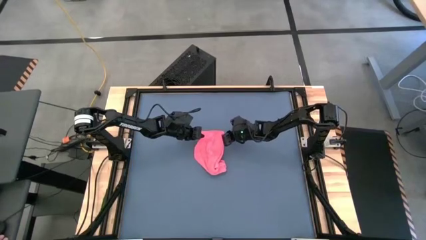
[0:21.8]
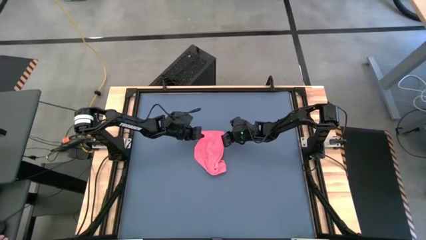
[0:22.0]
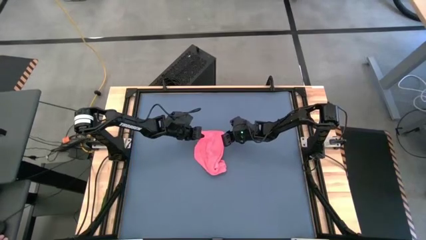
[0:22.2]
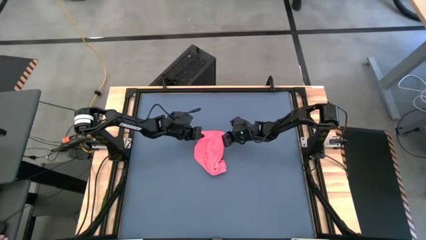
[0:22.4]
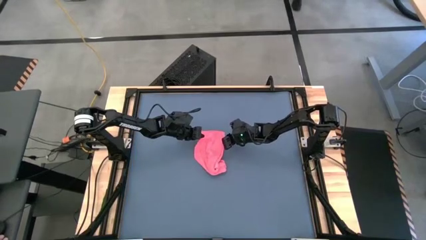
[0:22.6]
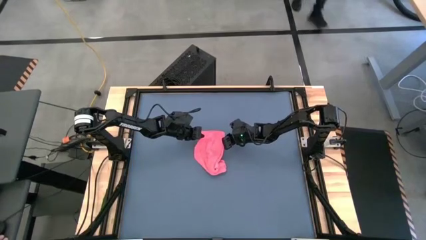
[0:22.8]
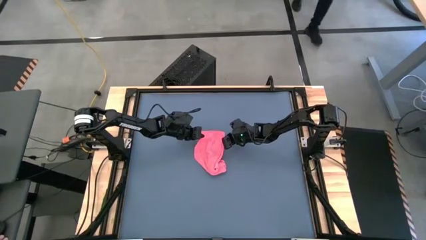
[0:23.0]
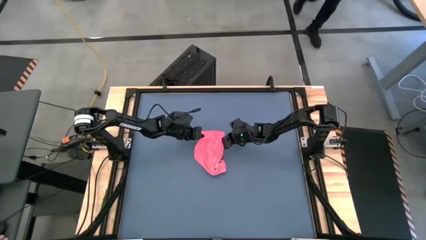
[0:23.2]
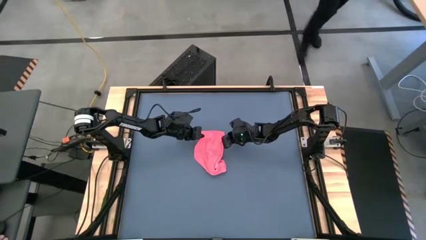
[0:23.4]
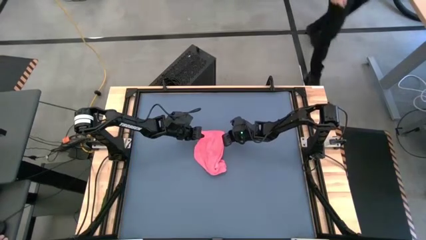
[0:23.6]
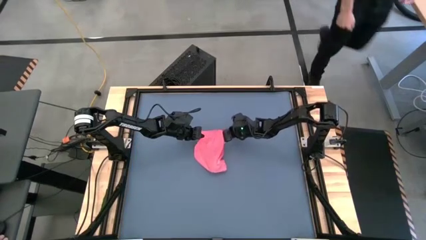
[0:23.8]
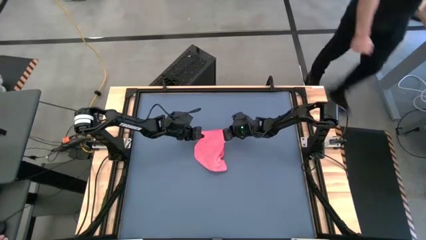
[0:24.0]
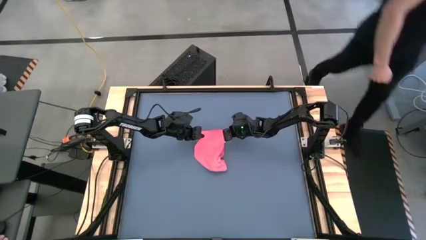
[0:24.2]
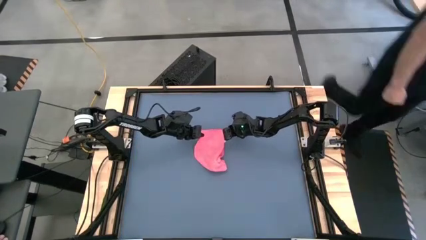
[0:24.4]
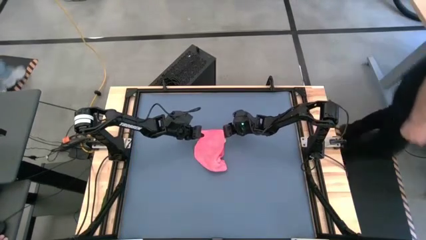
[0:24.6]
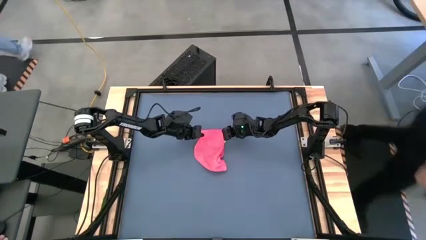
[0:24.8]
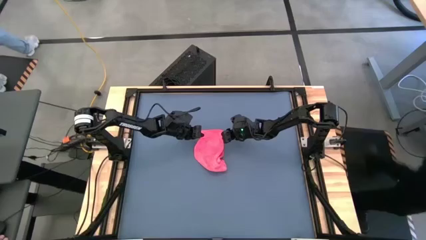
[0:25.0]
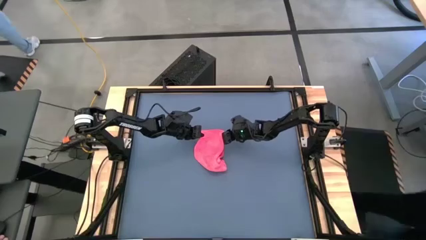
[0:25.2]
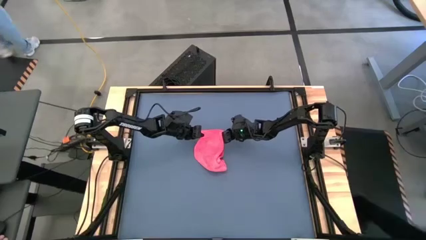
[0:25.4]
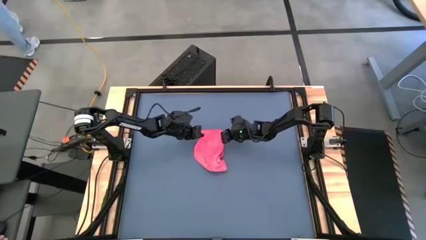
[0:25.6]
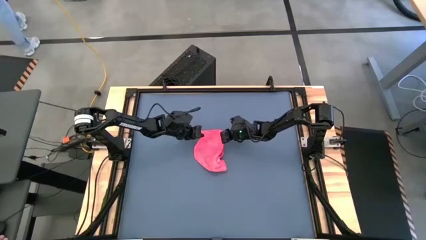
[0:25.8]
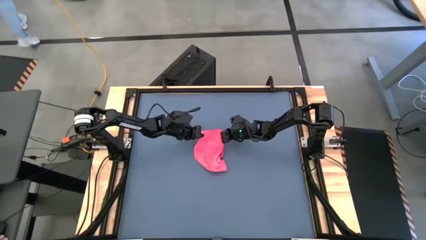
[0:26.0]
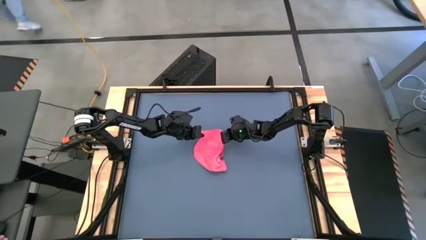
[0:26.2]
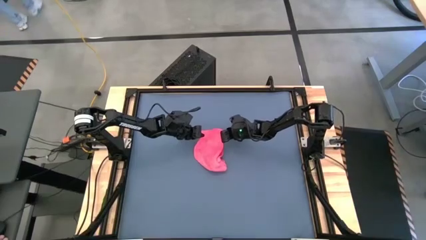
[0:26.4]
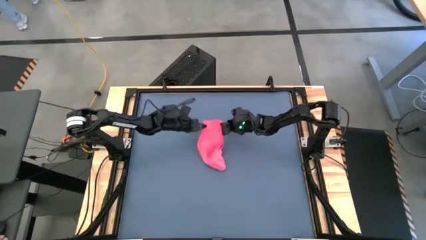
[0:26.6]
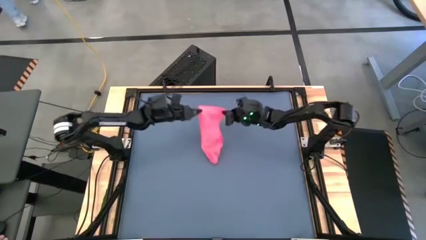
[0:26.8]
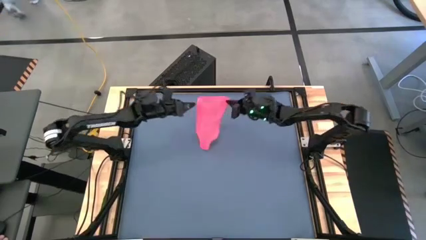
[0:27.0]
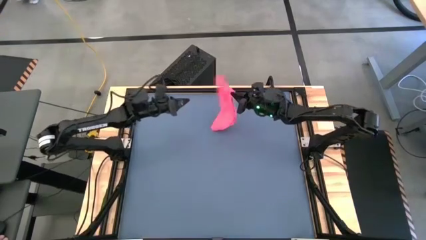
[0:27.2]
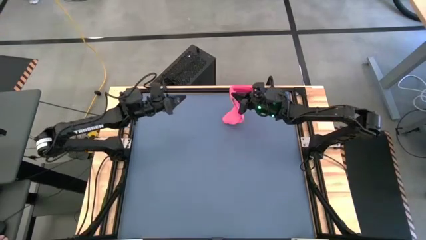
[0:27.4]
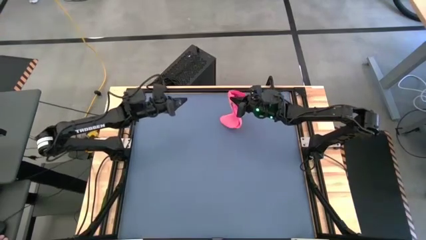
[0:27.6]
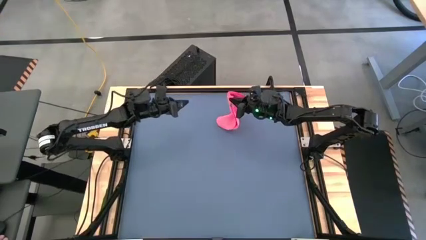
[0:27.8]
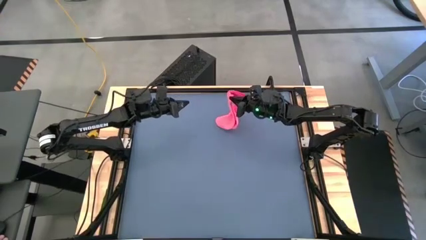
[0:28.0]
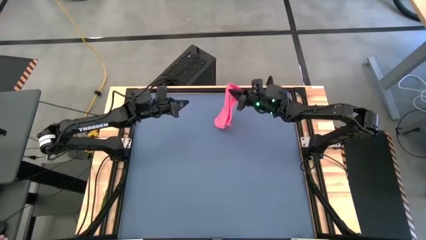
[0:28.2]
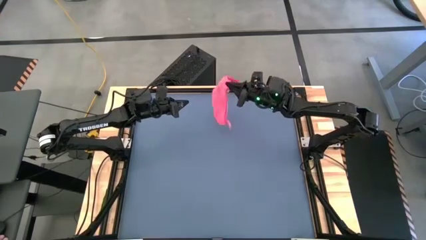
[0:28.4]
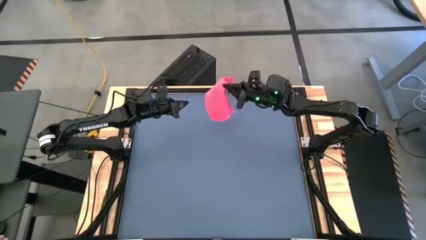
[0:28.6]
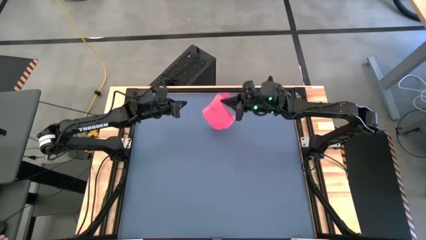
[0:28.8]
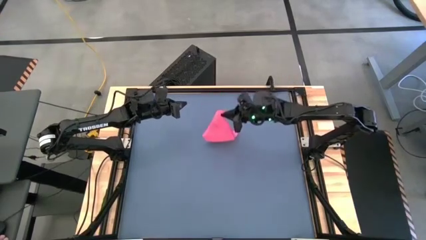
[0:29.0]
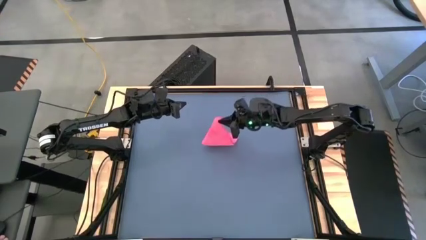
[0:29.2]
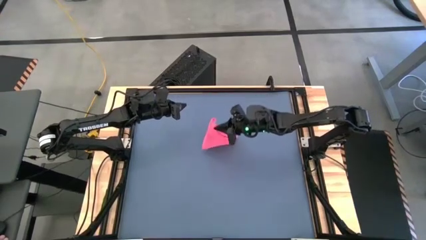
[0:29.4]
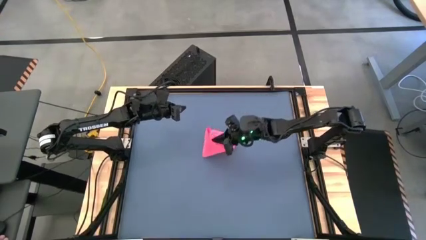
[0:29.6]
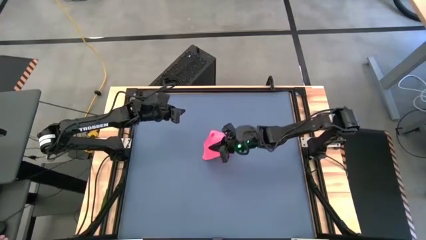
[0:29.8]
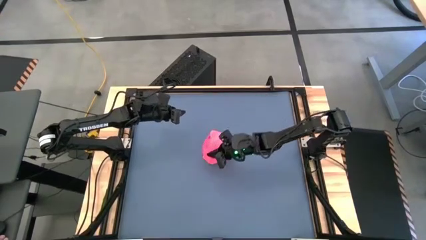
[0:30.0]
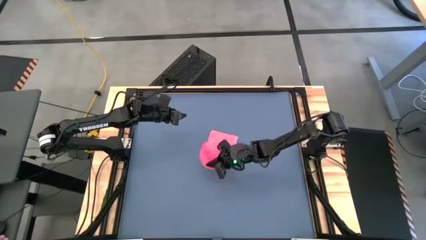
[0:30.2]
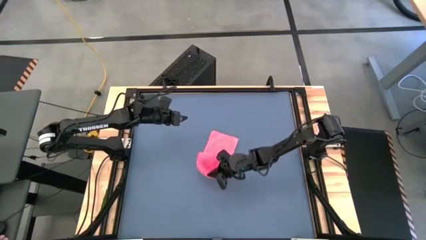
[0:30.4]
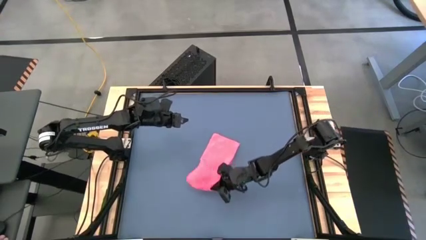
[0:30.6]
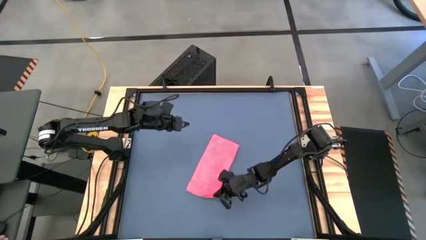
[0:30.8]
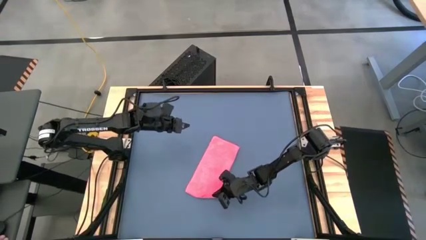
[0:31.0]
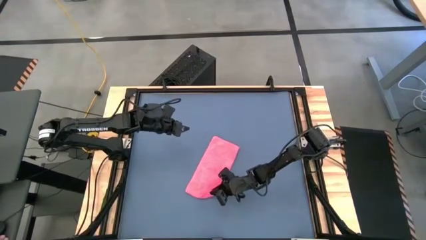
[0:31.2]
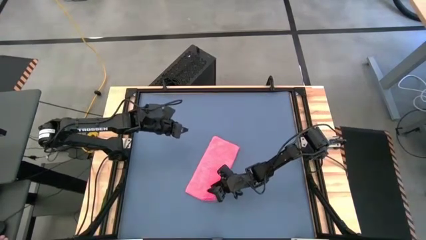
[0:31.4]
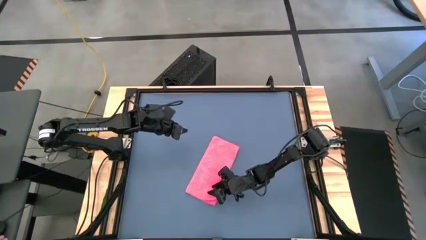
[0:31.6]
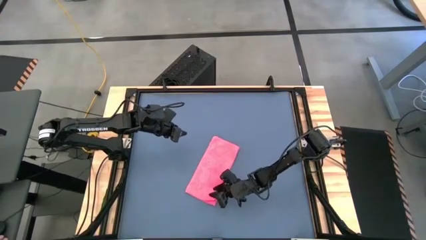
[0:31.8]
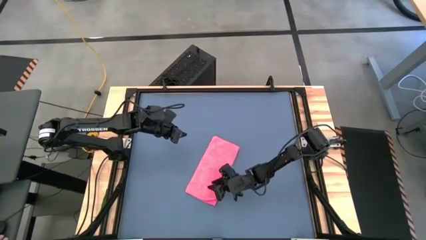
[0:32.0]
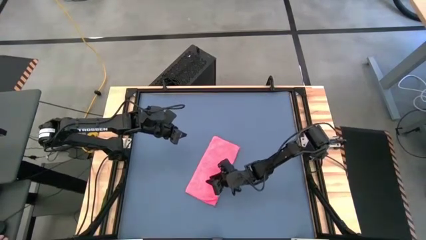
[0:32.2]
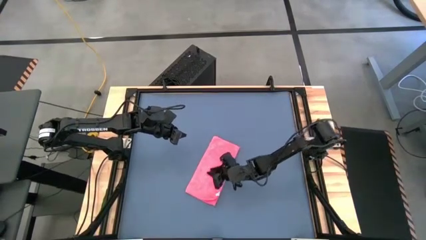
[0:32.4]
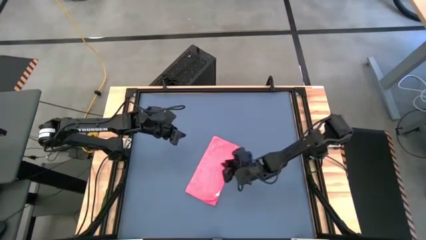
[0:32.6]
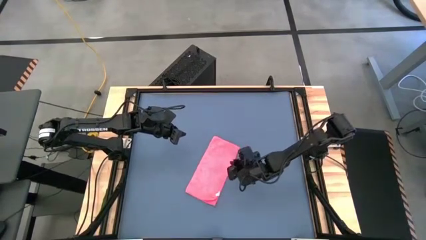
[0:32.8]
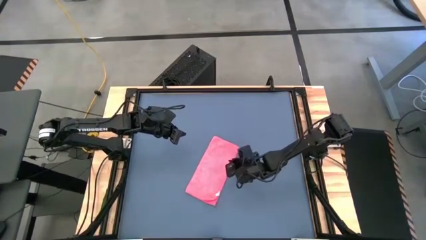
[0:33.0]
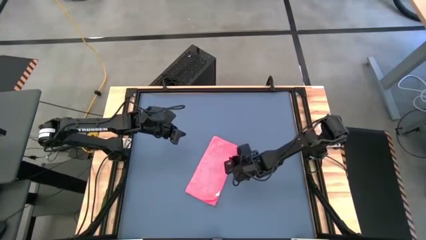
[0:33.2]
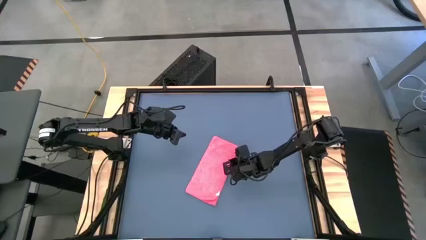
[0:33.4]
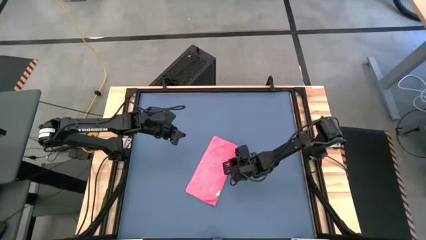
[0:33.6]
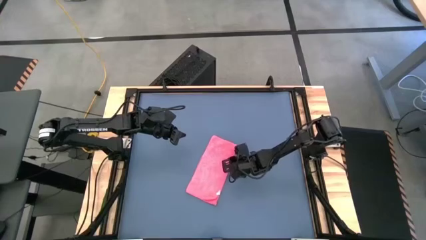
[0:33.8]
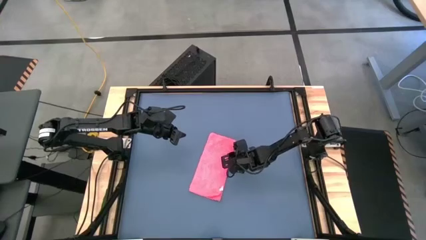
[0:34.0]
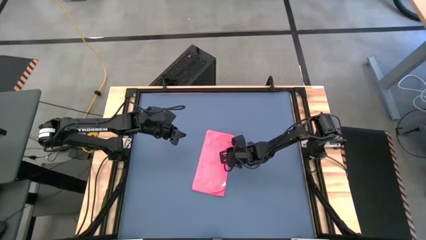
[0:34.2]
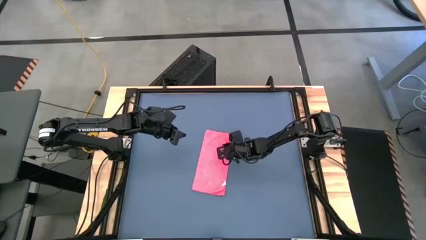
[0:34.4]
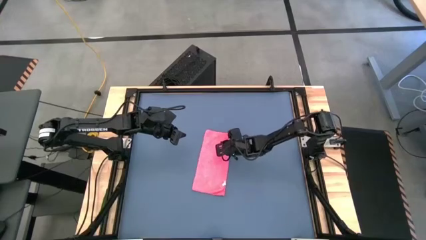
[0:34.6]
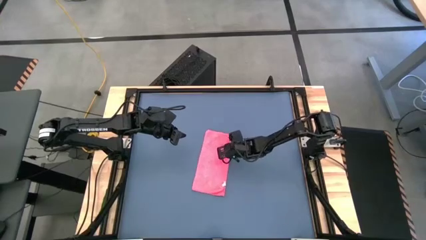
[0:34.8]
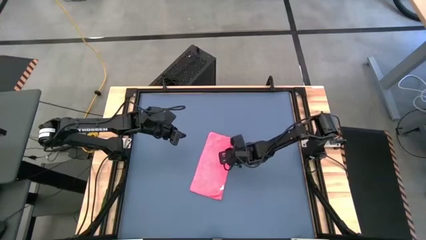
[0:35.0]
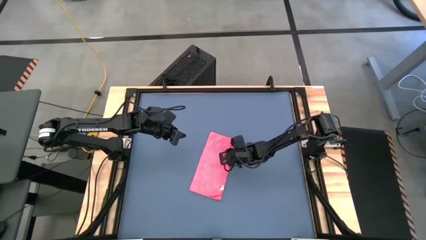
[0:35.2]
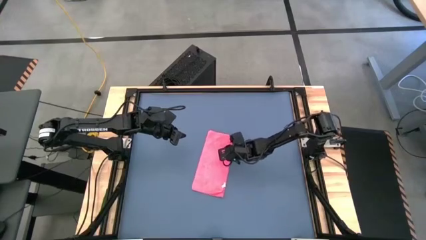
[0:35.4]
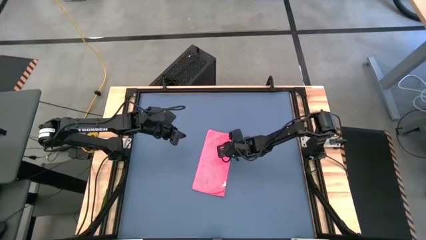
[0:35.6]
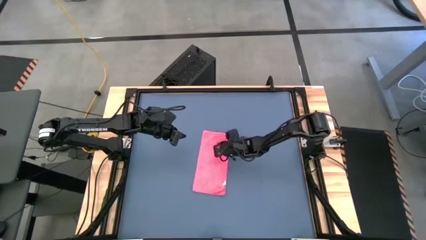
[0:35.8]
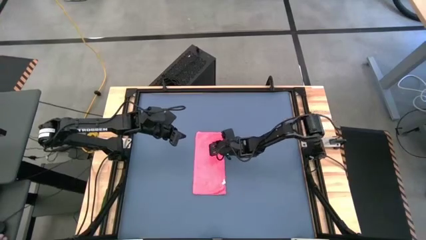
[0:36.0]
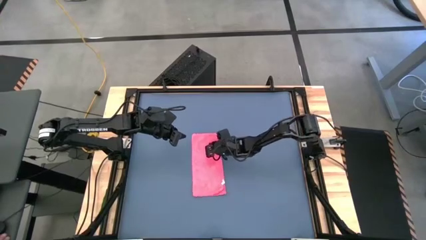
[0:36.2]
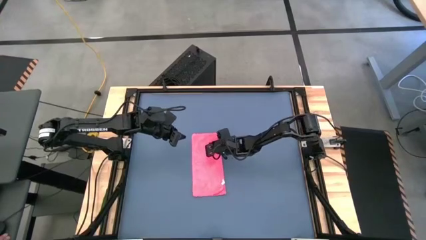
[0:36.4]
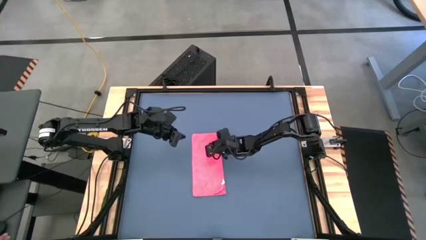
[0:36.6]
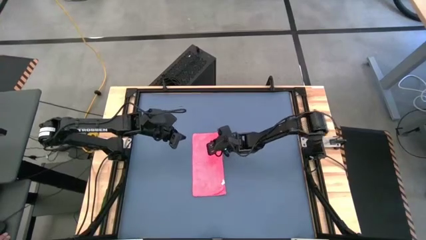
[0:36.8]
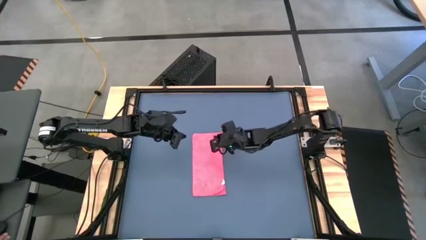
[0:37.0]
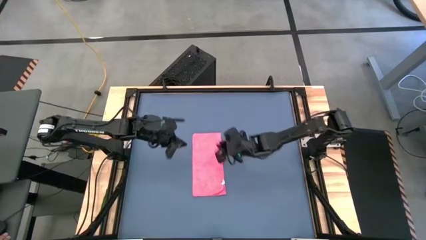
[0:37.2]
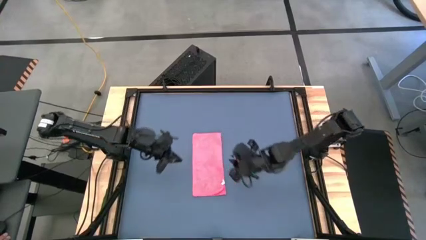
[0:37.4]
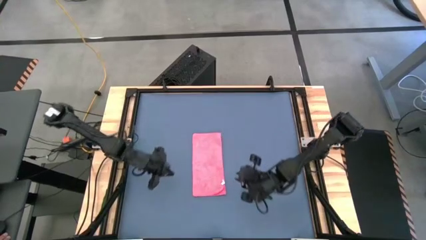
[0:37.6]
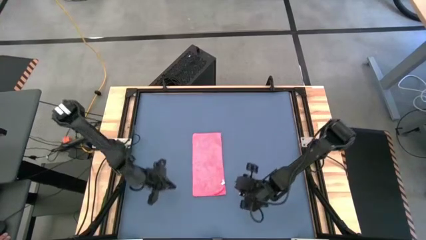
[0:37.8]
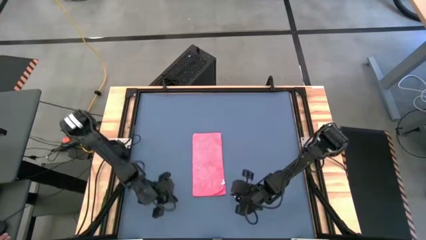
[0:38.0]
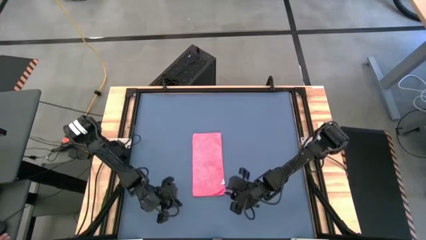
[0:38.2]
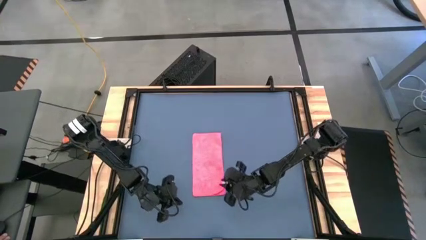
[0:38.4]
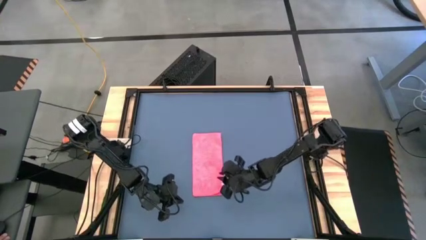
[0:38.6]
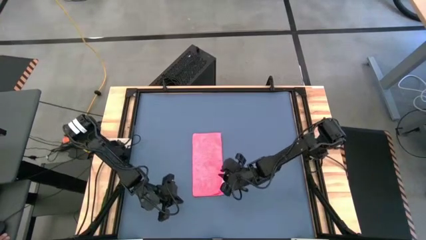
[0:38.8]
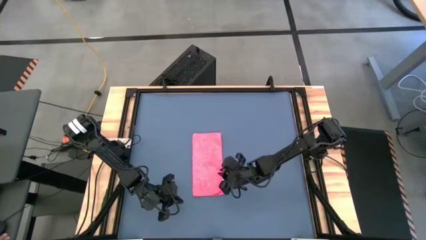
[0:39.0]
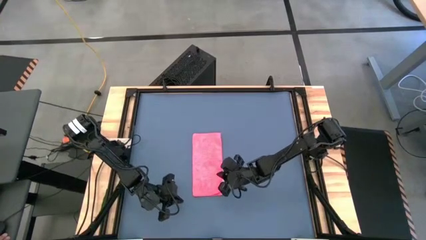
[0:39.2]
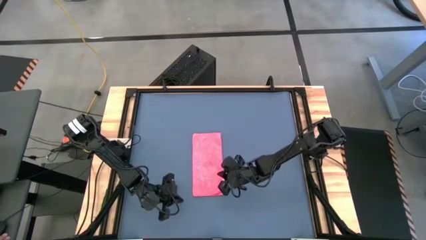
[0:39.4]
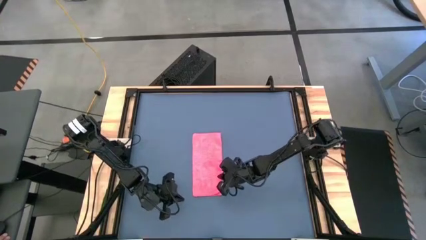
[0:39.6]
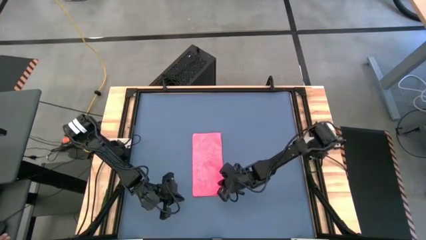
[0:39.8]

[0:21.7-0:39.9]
Task: Roll towel
Roll the pink towel
